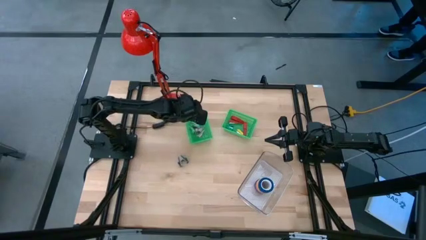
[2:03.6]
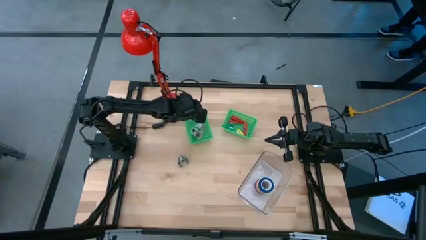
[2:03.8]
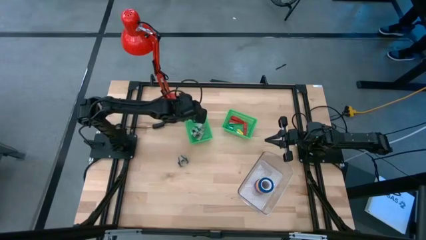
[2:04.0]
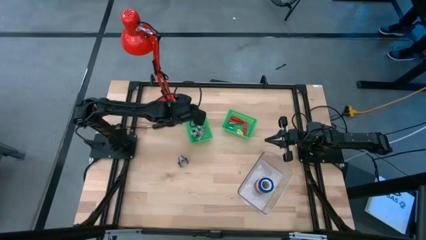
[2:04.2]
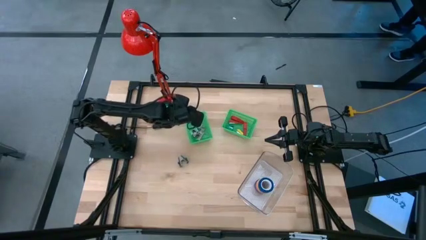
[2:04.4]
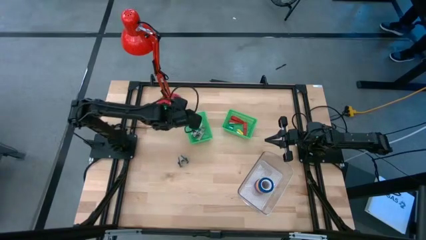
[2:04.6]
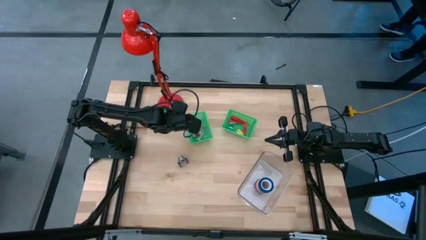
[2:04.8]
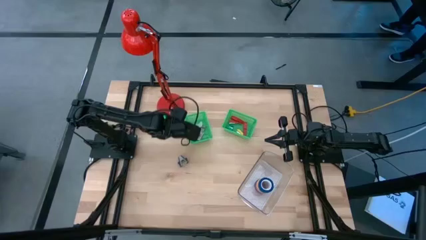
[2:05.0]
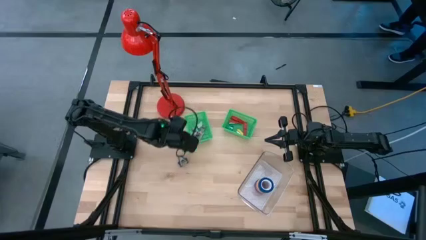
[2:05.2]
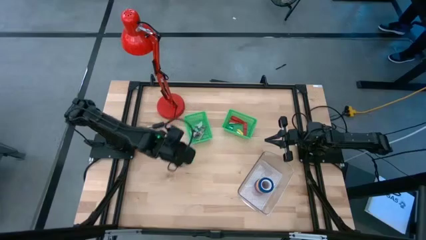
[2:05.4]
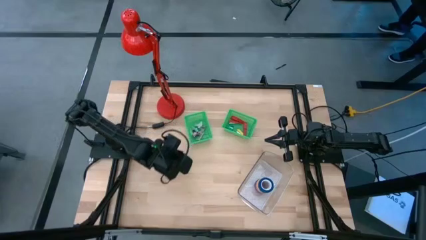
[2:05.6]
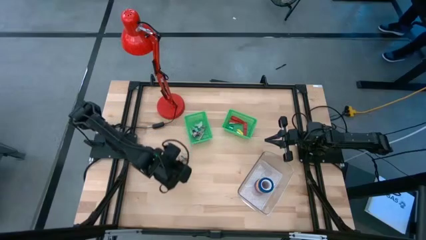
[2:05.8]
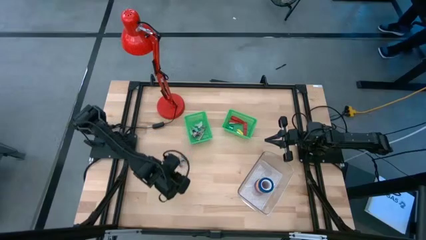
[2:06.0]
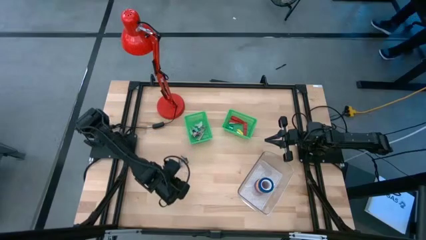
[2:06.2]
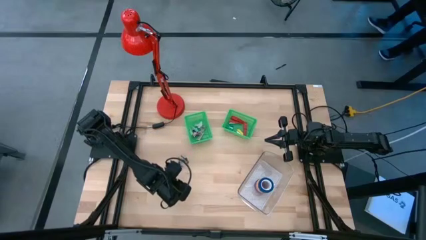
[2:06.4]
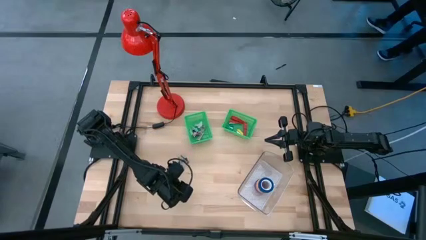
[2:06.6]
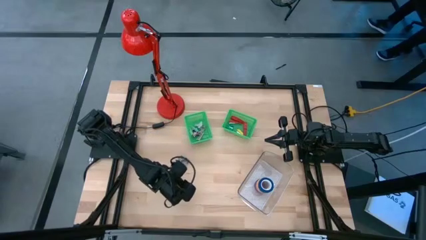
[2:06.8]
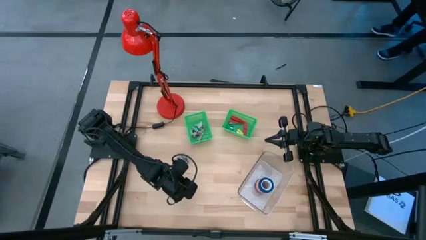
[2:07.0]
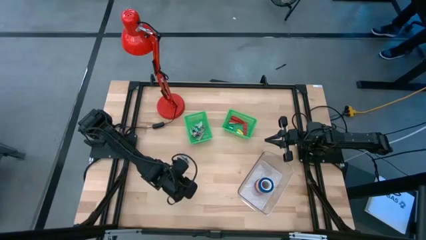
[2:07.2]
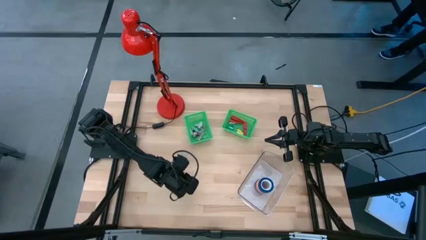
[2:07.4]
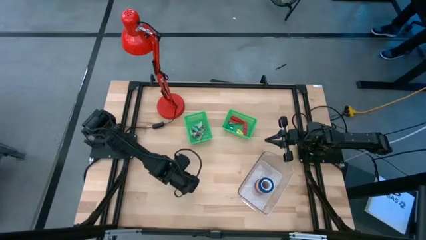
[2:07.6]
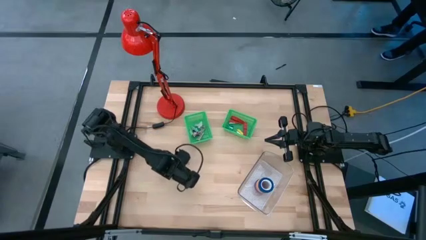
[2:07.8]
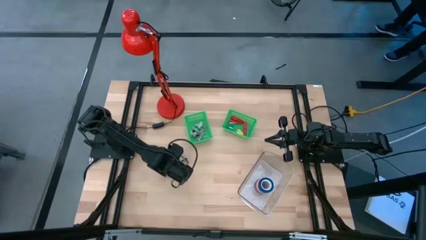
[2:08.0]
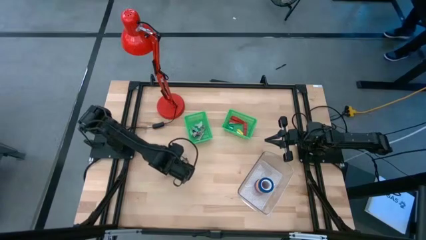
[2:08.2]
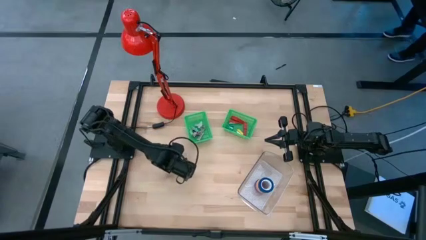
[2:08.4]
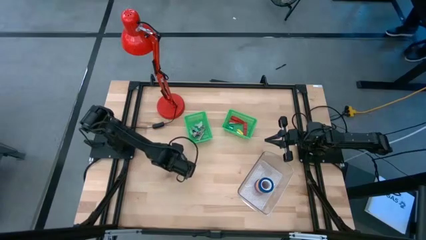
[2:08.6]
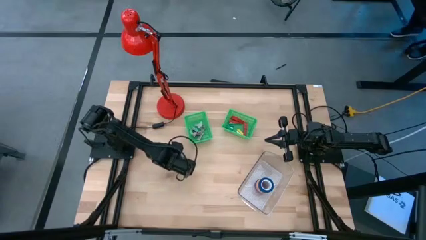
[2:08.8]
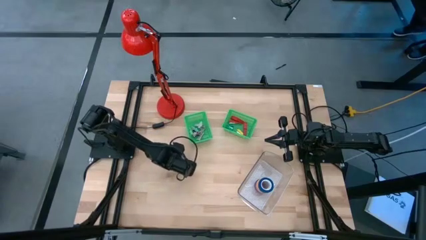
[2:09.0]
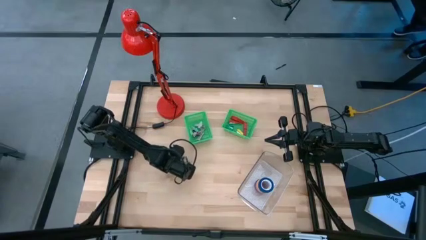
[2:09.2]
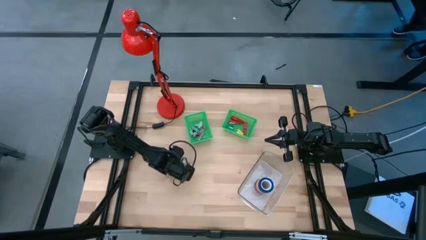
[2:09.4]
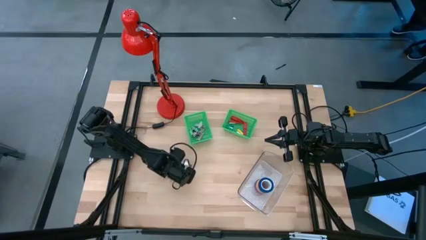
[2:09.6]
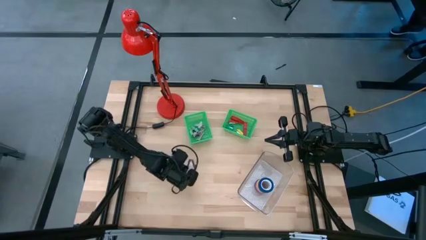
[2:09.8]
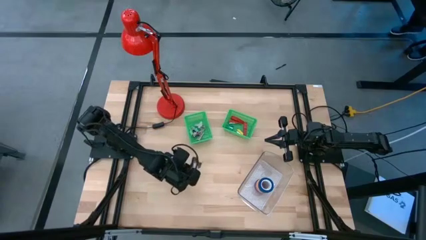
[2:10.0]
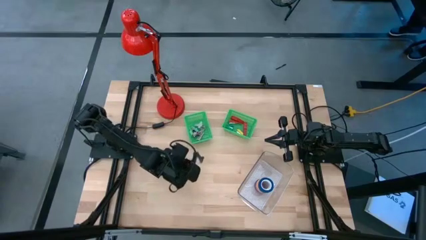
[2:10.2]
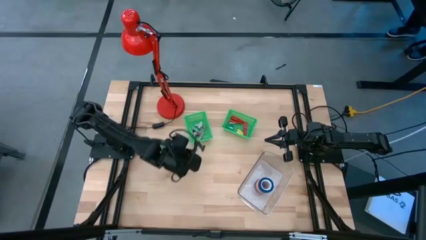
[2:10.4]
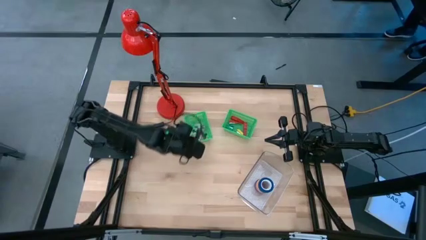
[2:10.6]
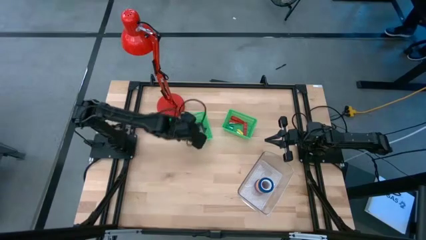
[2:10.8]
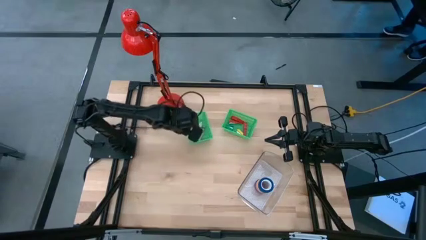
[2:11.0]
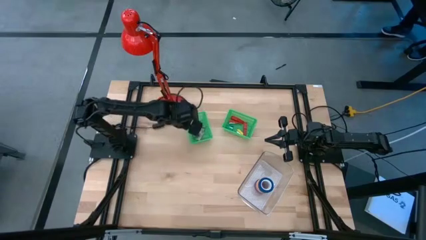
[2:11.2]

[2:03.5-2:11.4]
Task: Pick and place Stapler, Stapler remover, tape
Put the black staple remover into the left green bin

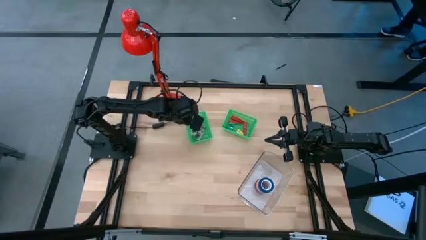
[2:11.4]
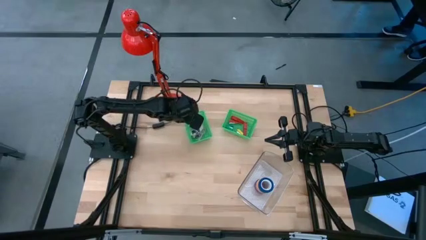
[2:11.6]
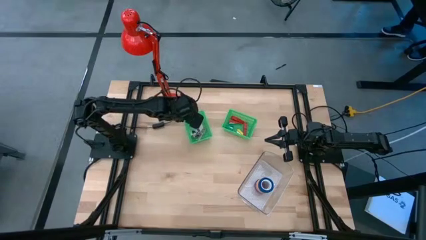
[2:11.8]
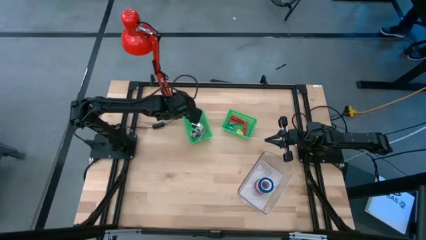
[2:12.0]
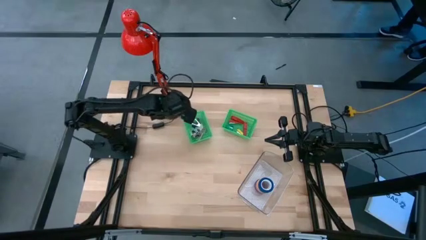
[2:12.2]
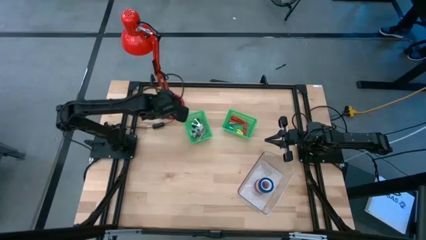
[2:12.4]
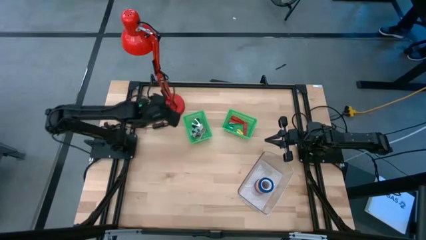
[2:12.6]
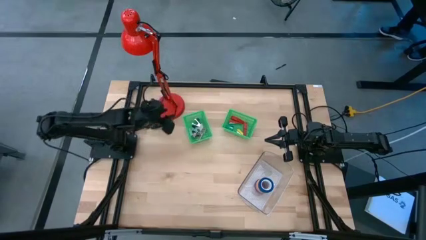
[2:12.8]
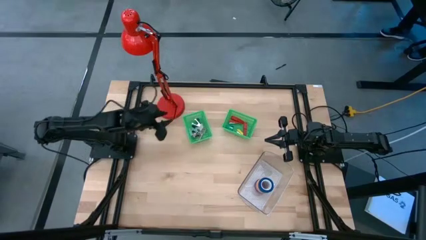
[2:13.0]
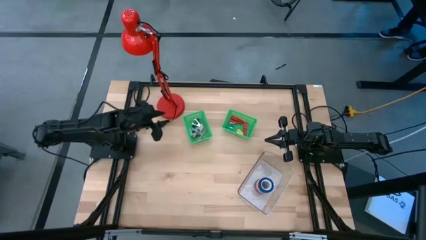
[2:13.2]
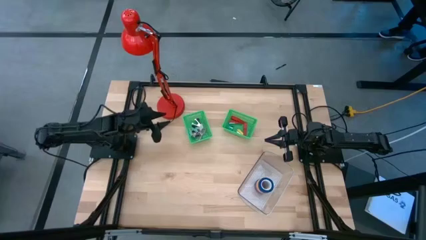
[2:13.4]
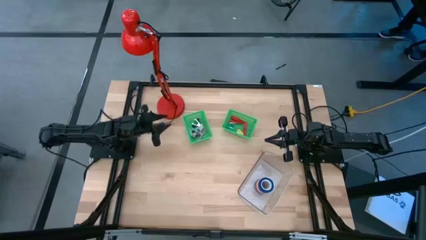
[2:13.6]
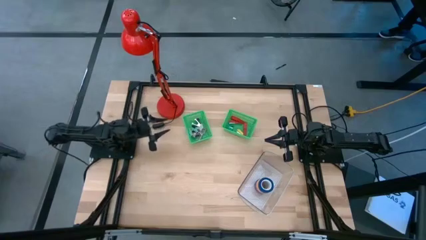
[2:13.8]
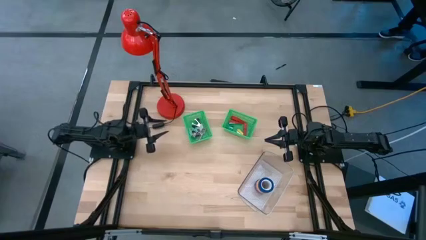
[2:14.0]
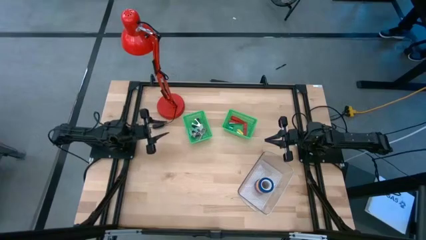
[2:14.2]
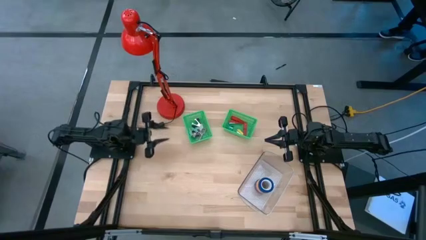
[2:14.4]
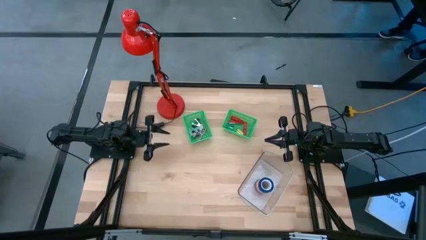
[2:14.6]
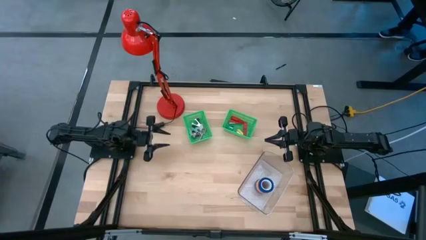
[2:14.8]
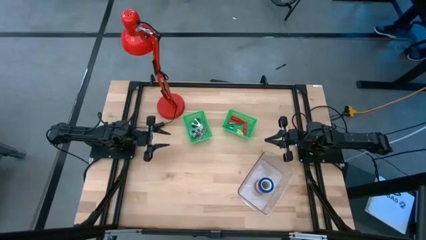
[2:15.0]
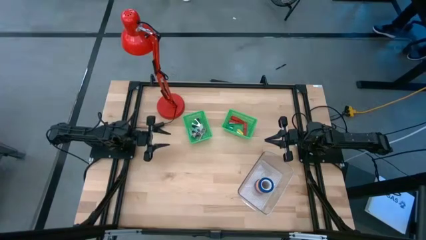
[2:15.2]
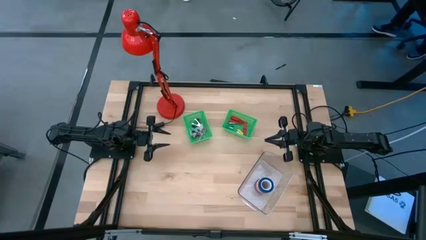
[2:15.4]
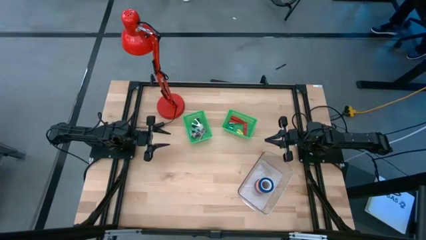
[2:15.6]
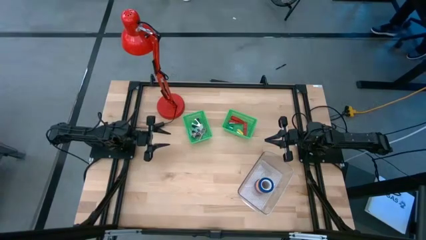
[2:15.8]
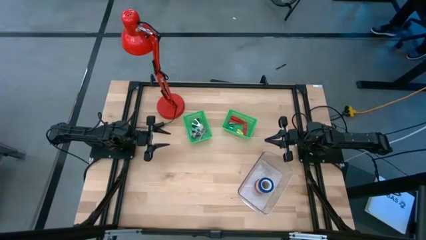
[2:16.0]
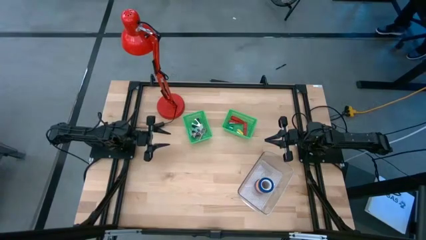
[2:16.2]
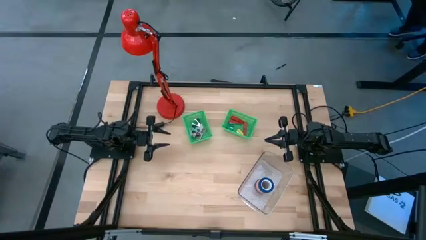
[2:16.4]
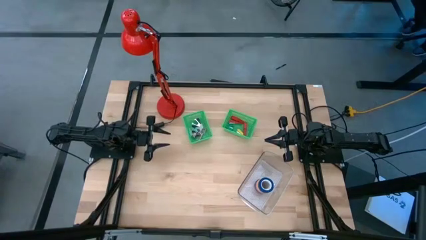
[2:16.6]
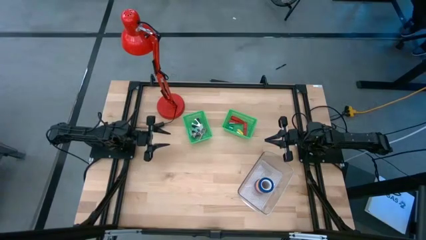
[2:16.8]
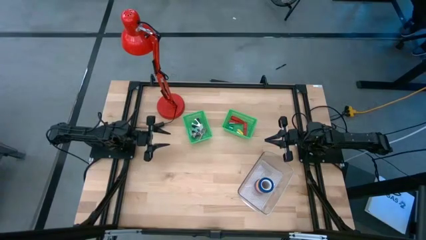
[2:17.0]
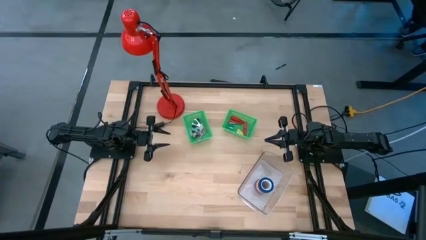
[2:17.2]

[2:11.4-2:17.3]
Return to Home Position
